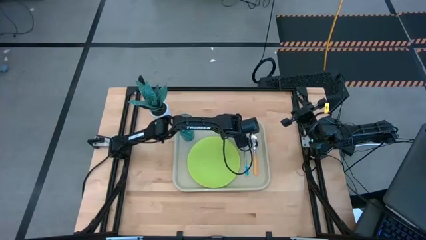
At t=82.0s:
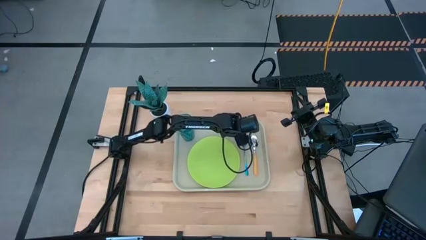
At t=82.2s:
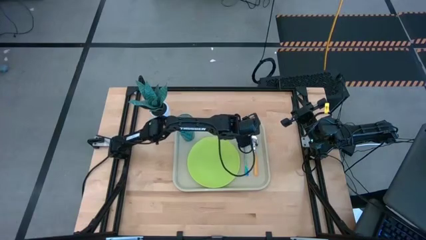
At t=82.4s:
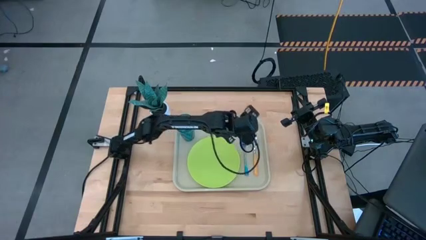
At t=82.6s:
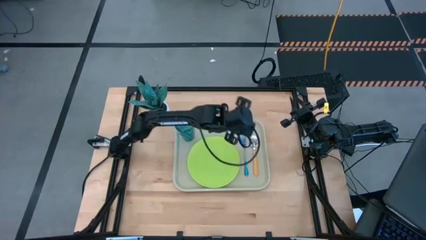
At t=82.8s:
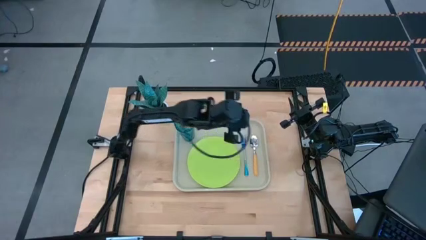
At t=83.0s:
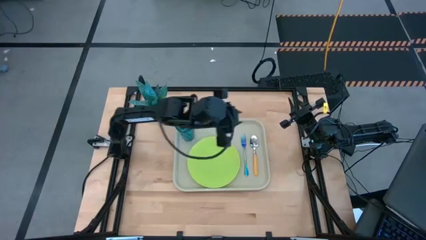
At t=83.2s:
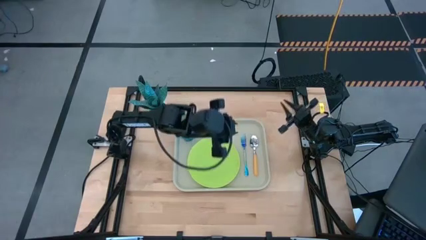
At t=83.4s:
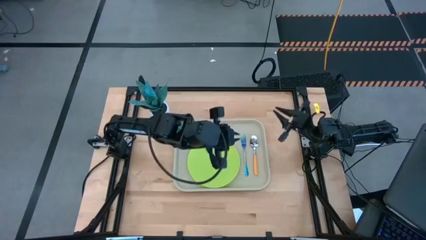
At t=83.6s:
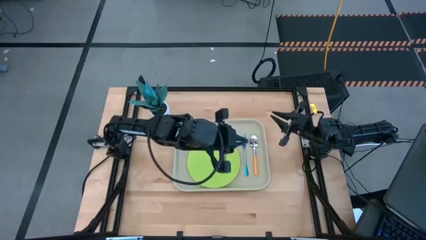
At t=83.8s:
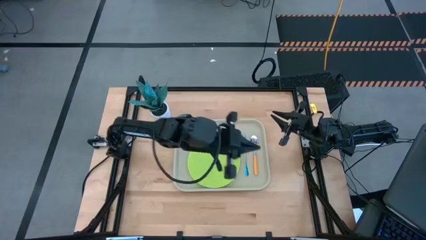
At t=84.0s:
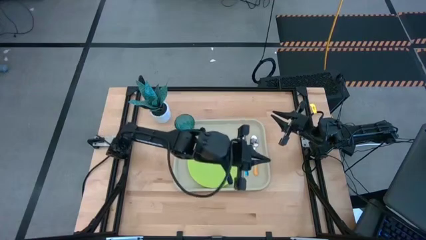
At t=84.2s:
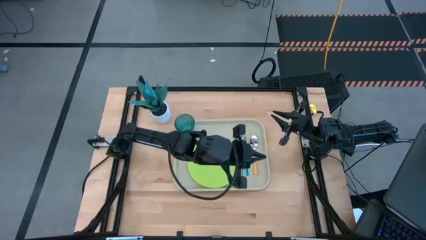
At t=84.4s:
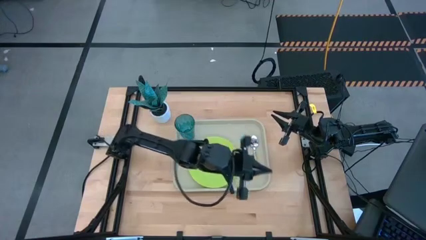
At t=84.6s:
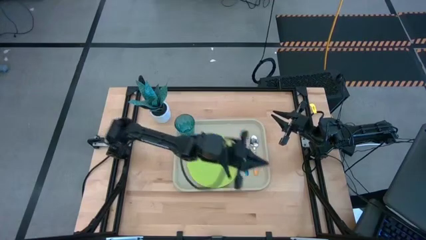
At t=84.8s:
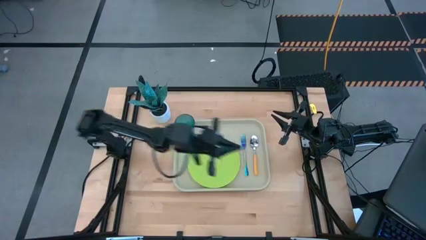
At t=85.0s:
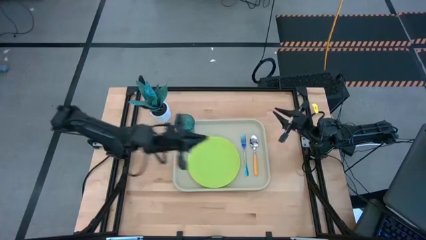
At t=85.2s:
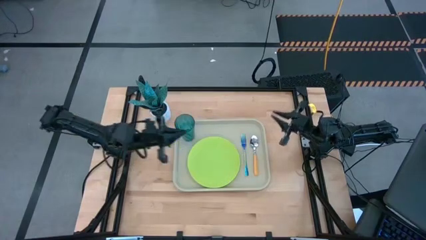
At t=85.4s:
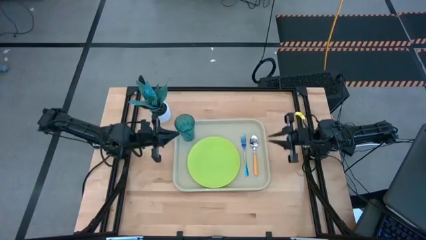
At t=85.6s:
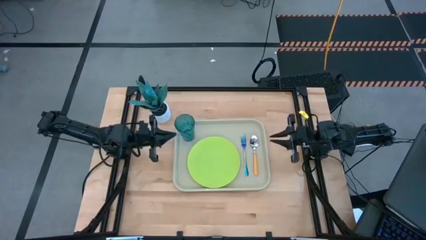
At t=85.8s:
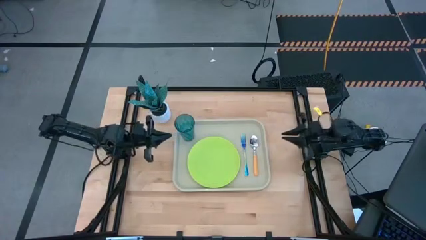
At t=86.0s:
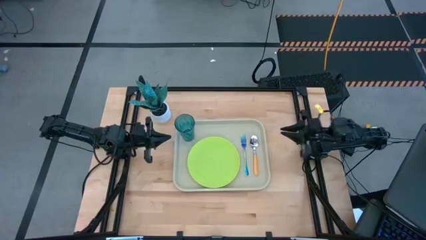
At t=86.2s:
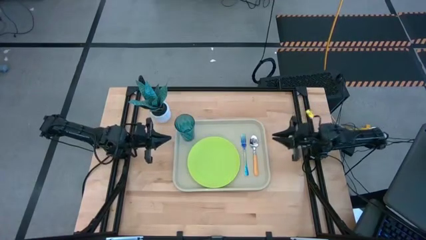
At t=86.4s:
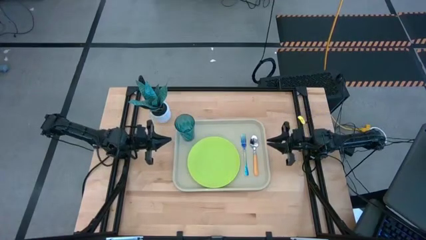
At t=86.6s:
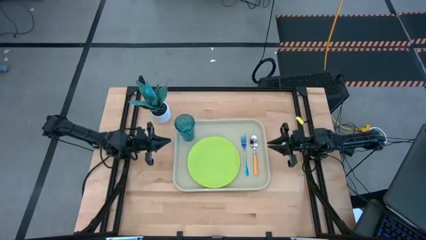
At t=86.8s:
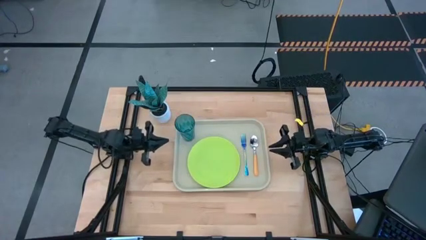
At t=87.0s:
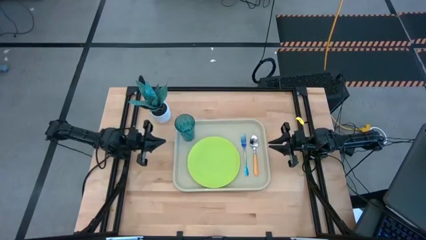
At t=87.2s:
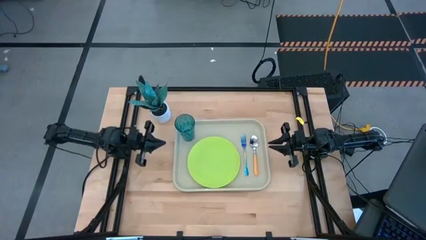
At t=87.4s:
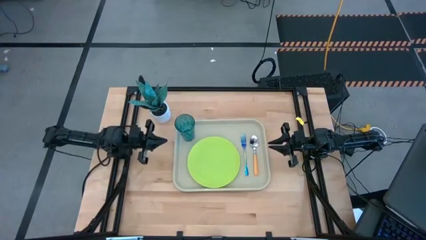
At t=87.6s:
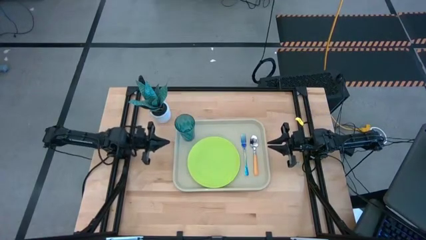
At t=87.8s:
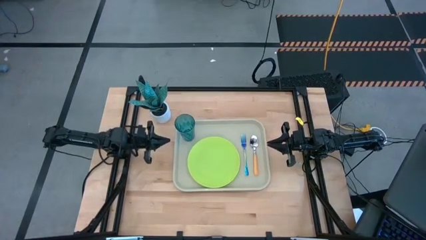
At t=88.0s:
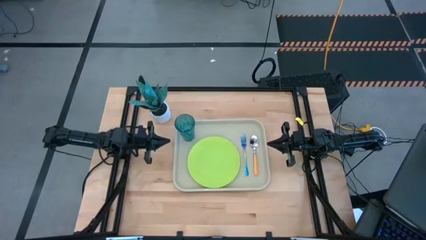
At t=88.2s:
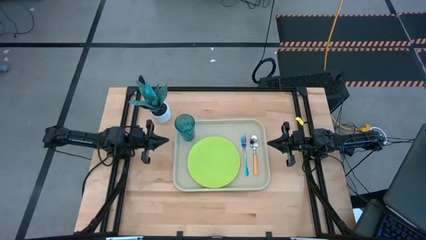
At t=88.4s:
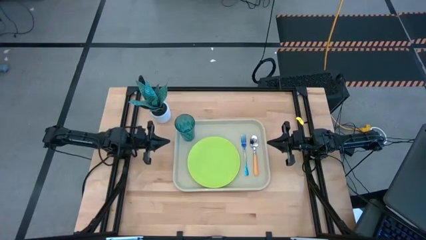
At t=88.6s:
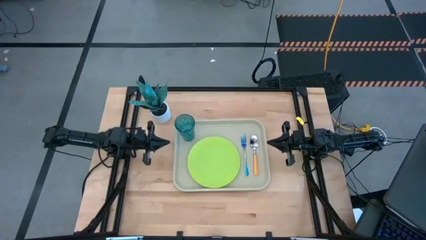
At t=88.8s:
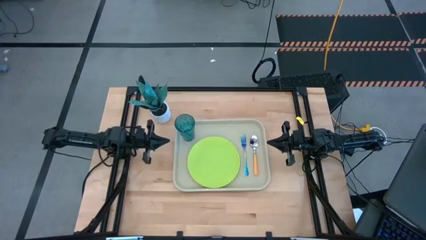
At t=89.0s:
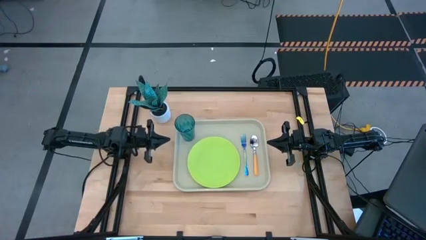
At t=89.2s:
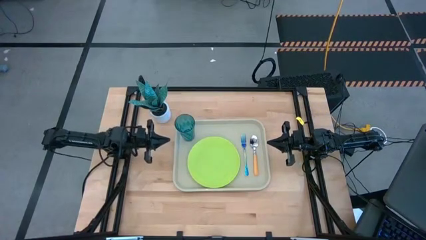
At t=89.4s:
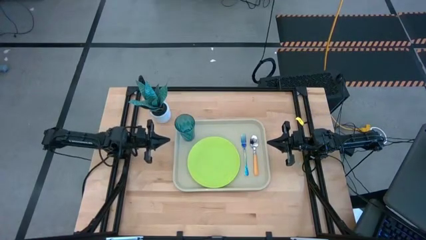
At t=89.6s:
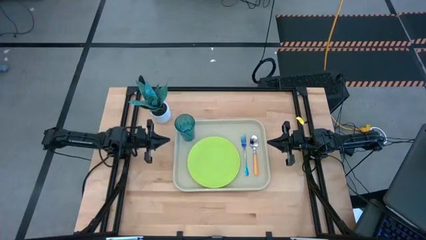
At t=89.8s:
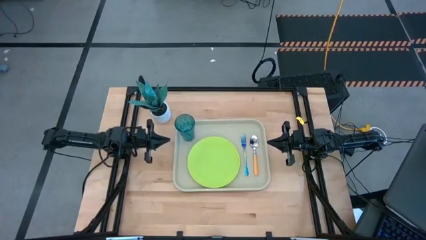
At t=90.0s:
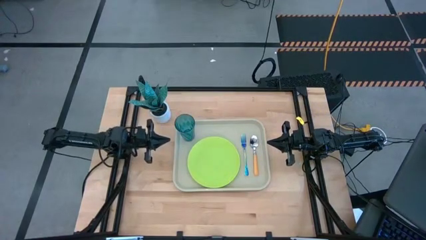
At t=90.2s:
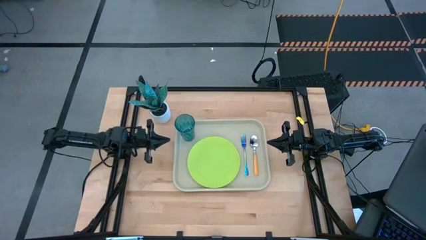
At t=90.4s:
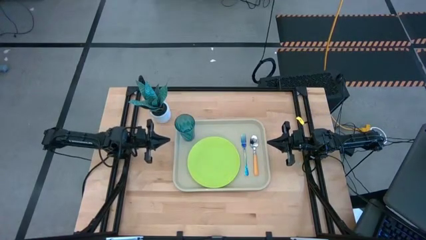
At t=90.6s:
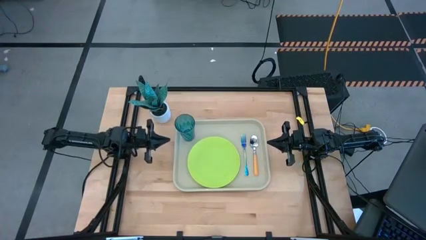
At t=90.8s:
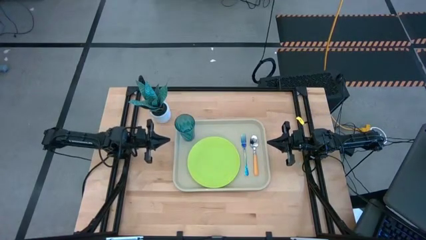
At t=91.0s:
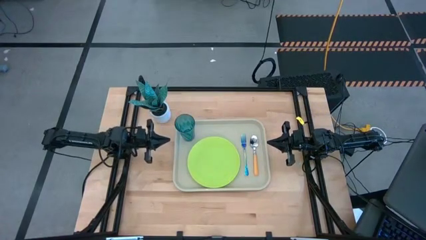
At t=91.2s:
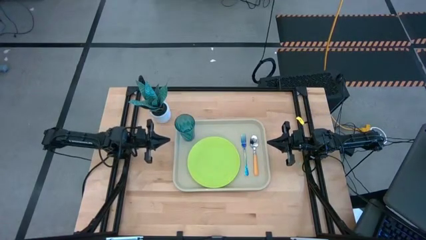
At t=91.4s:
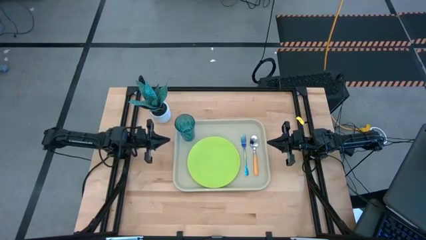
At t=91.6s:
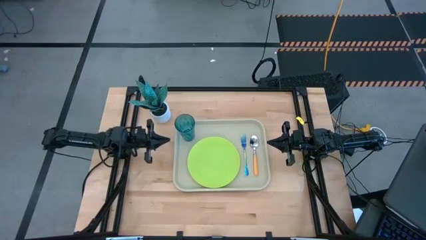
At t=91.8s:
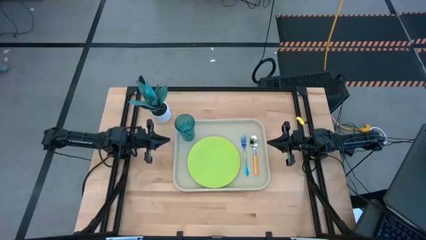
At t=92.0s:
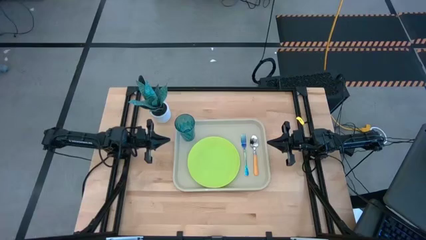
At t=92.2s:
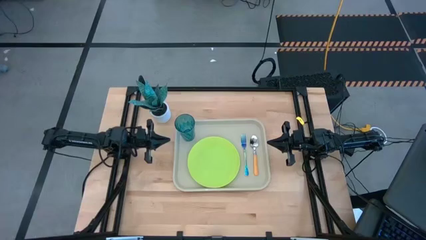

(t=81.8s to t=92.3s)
Task: Pick and place plate/cup/fork/spoon on tray
Adjust the white food tray

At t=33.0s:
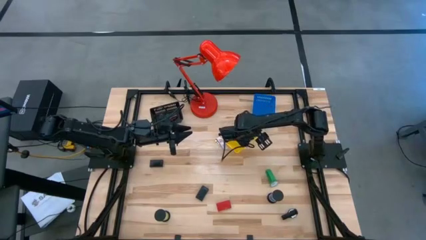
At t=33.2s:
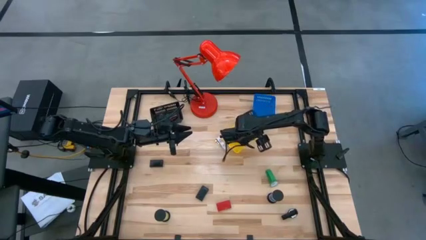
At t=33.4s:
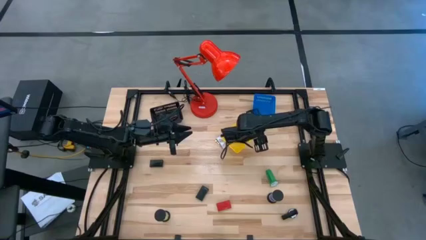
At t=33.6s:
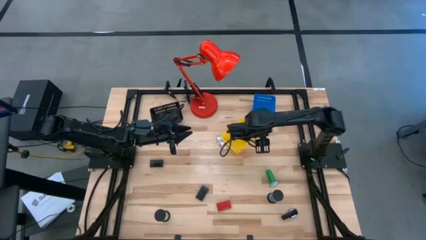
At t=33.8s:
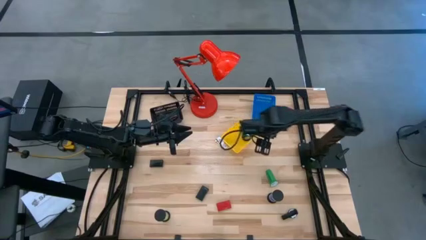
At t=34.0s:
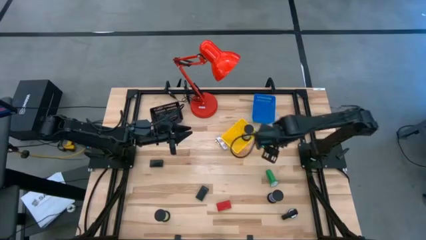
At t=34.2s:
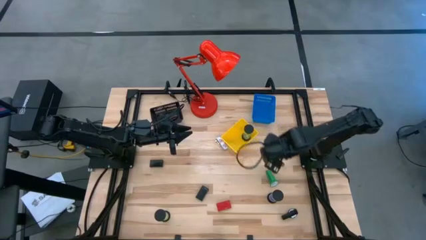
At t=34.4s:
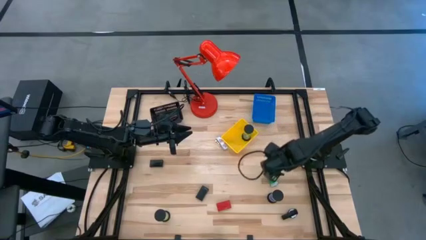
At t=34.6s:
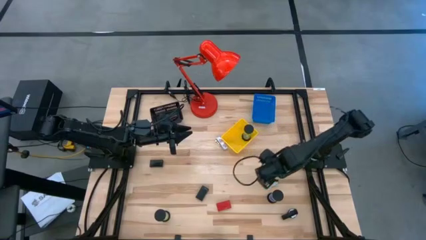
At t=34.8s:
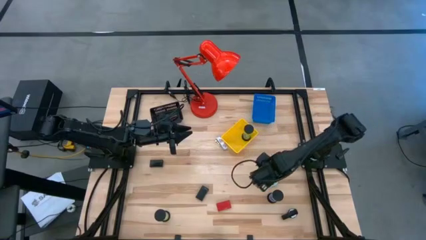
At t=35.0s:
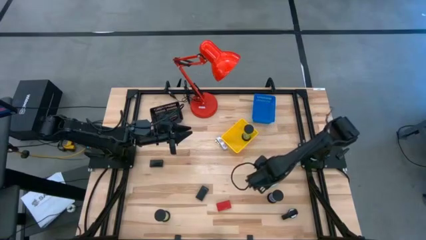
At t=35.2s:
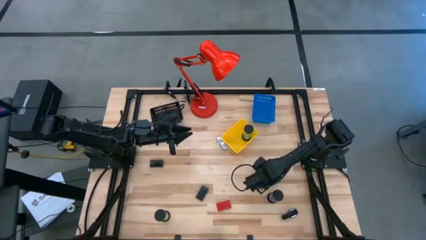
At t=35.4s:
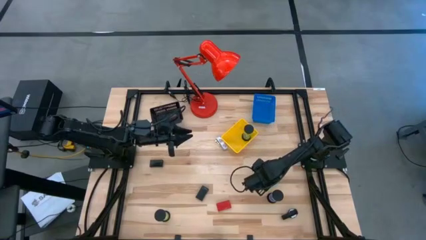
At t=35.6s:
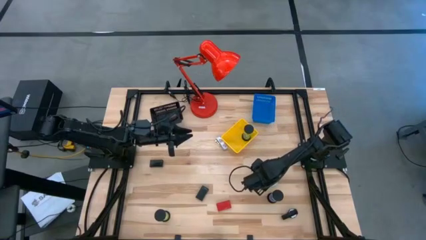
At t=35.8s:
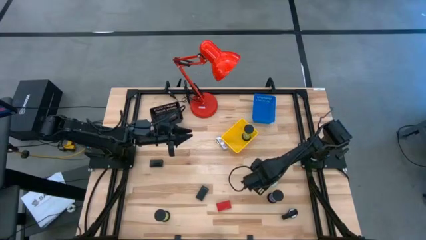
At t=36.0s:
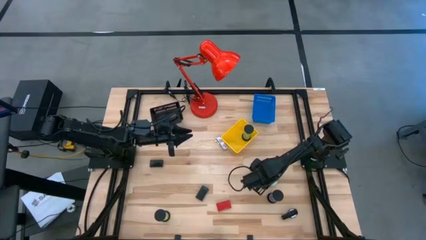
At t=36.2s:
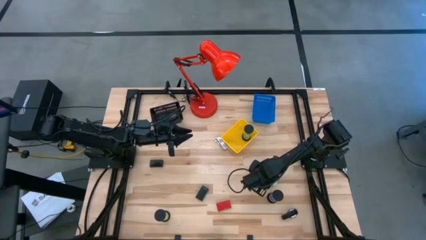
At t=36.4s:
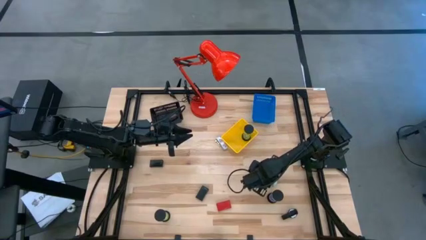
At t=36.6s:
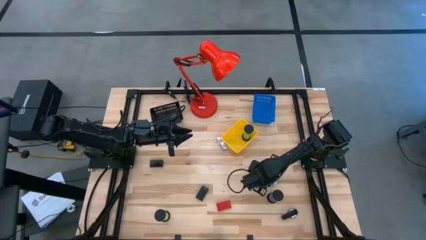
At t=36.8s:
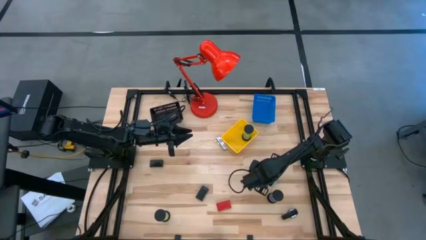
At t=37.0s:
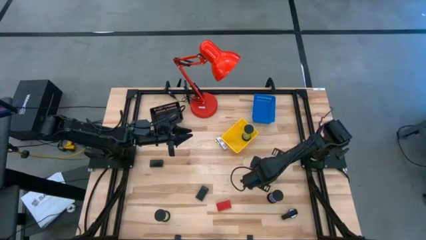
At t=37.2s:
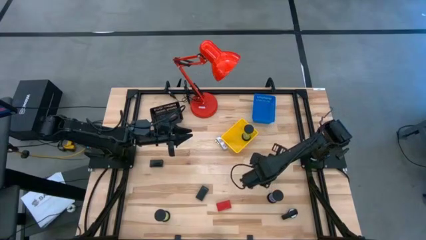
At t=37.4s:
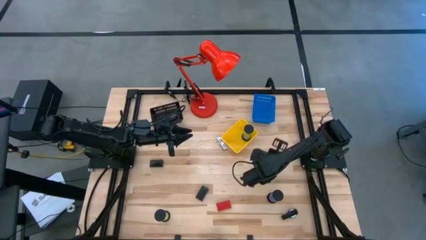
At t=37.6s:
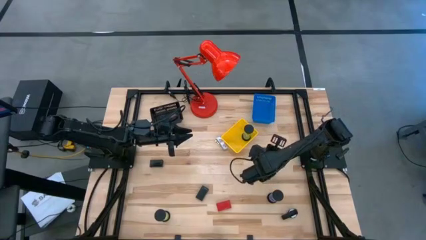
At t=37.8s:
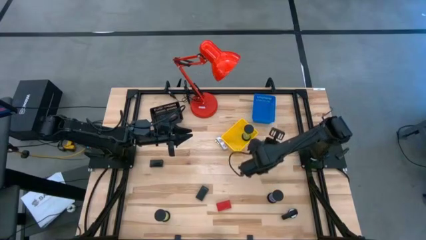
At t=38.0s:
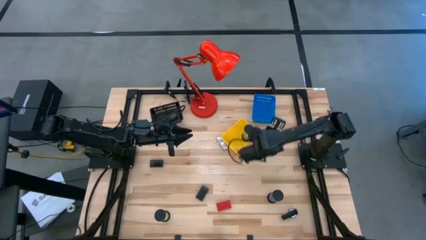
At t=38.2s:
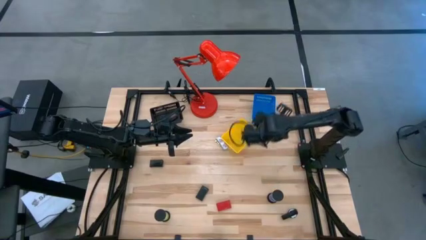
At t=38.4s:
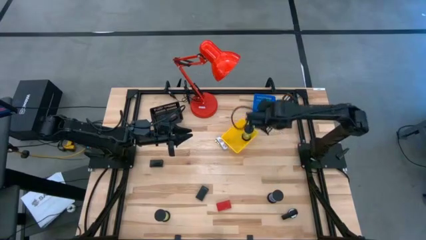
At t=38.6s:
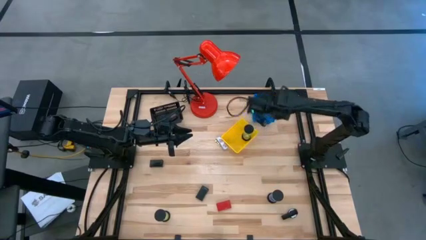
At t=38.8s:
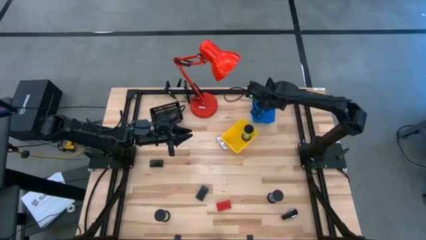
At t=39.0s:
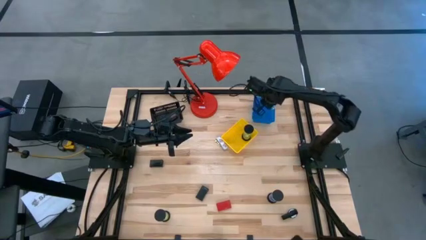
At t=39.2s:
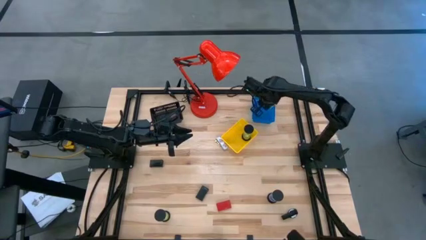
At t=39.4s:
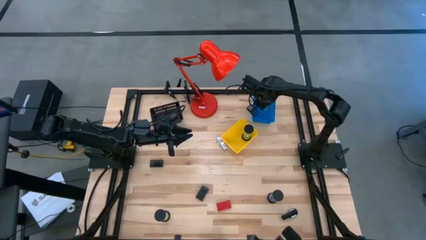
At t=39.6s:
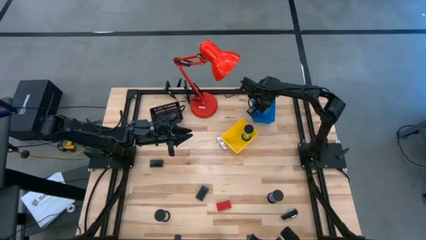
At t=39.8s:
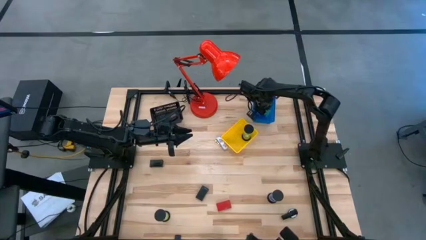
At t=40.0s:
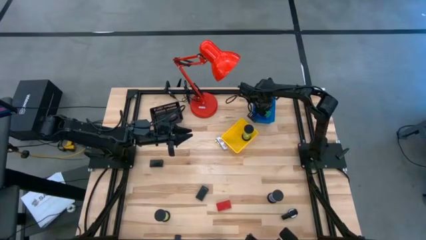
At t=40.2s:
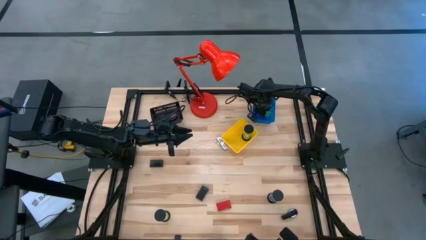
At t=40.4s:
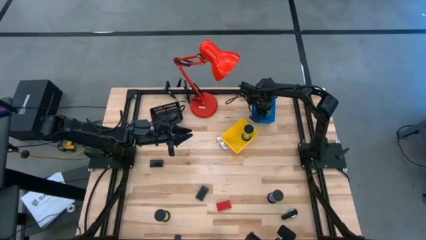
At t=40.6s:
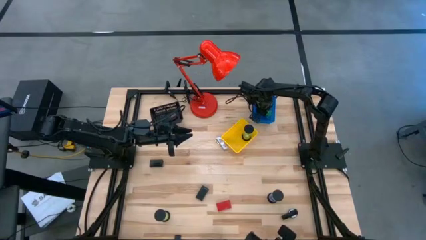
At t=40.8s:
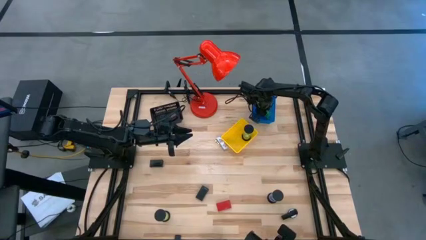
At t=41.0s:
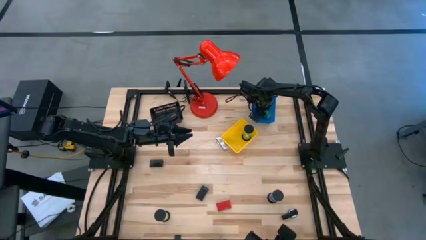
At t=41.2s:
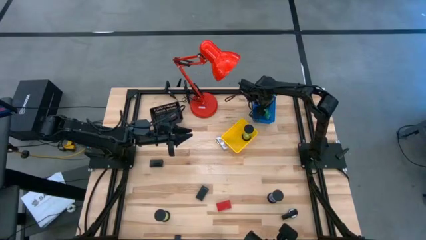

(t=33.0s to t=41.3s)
Task: Pick & Place Office items
Put the green wrist watch into the black bin
